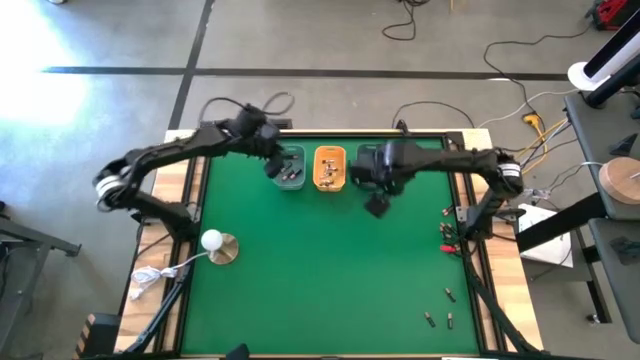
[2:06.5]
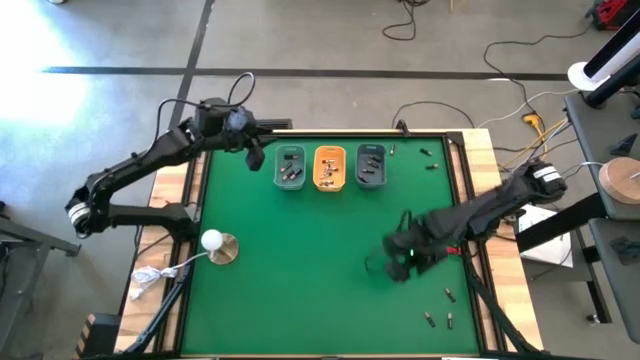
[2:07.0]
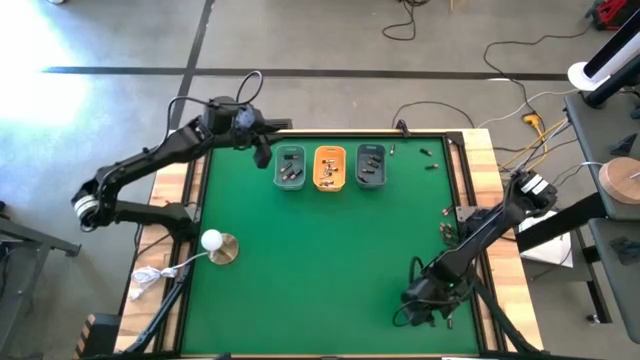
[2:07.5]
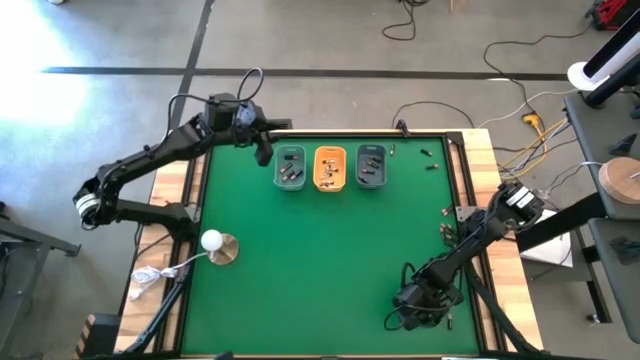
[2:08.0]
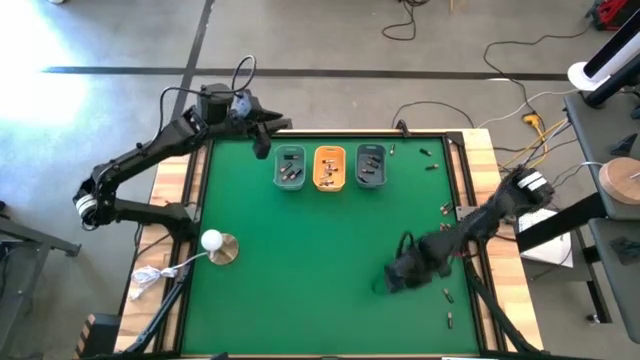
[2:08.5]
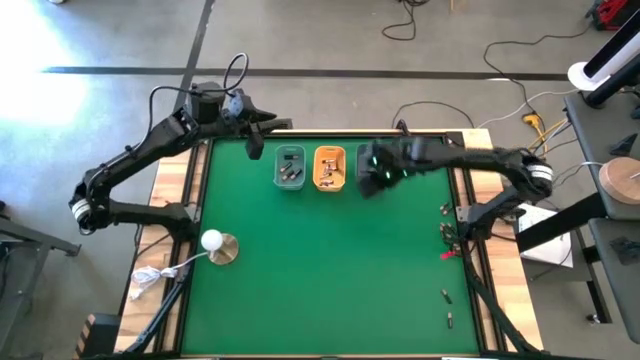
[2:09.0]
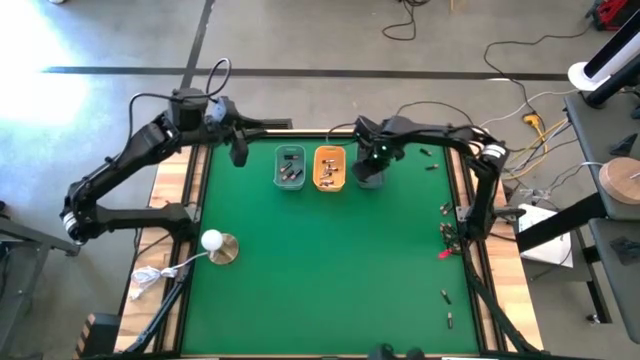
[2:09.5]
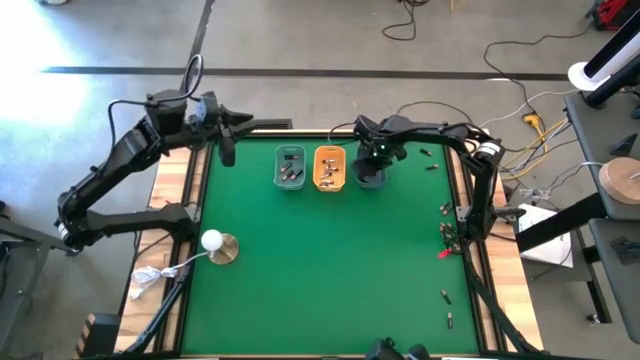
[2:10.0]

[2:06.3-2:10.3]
Task: Sort batteries
Put the small brown battery into the gray bin

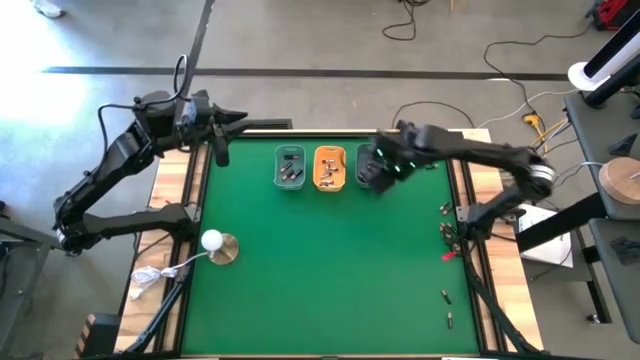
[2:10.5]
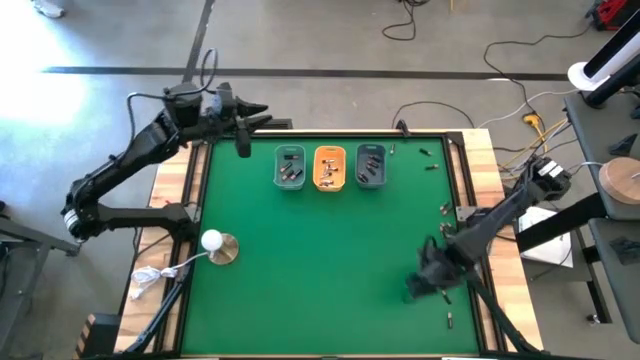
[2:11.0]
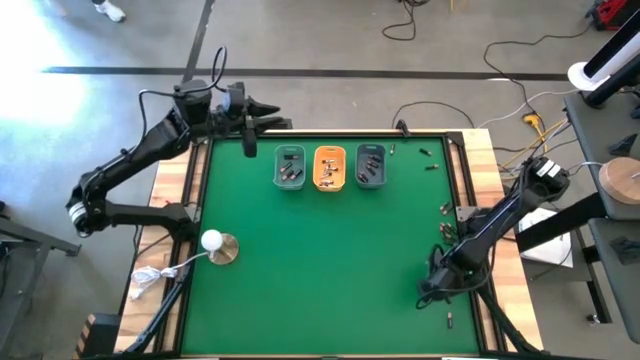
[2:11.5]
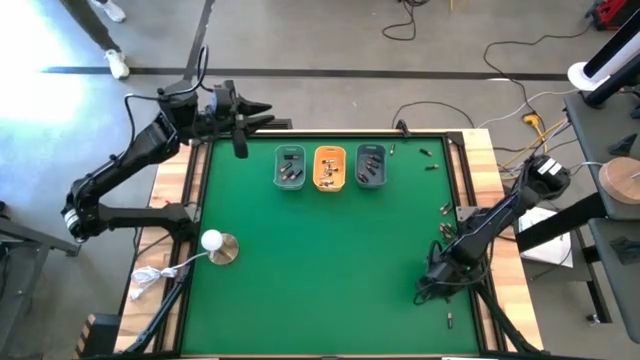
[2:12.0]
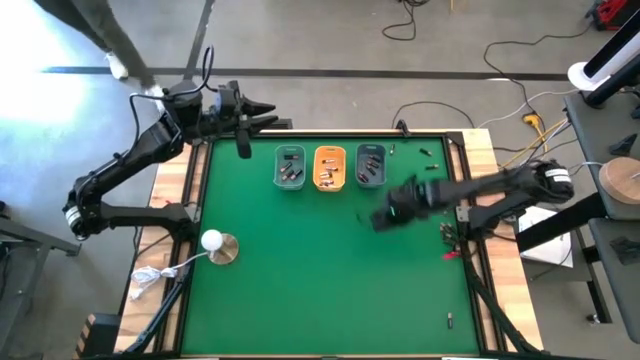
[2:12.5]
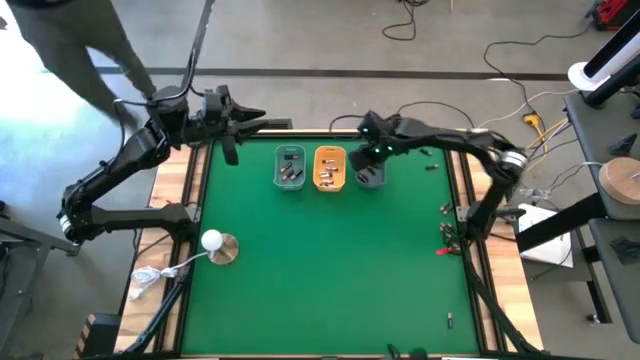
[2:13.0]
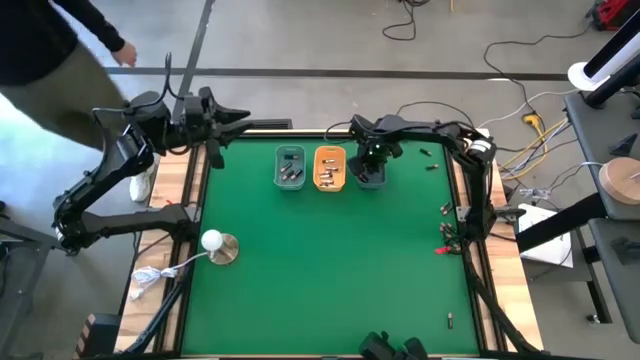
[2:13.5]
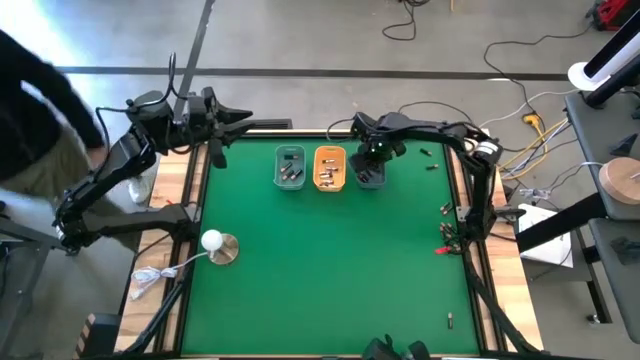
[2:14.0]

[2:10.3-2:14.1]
Put the small brown battery into the gray bin

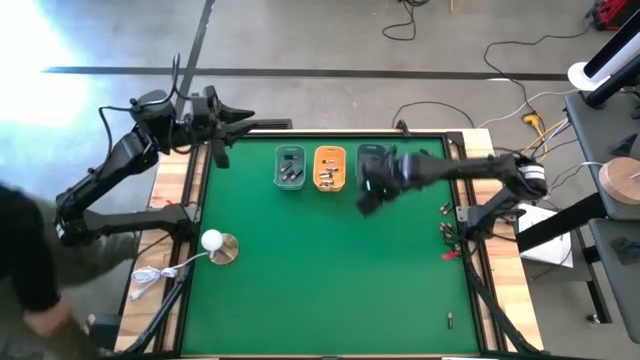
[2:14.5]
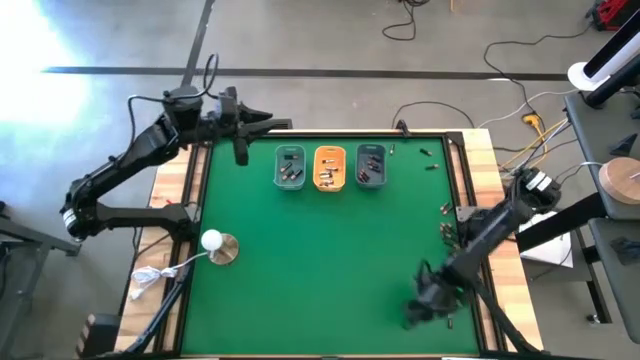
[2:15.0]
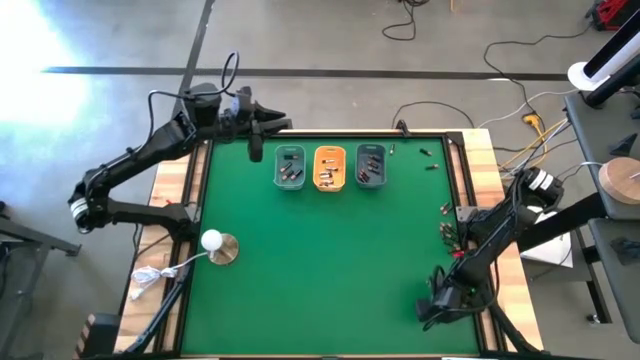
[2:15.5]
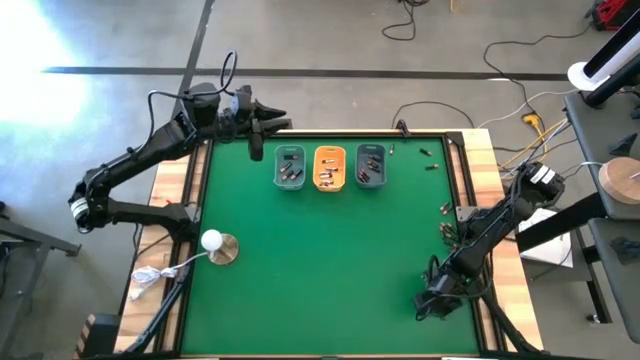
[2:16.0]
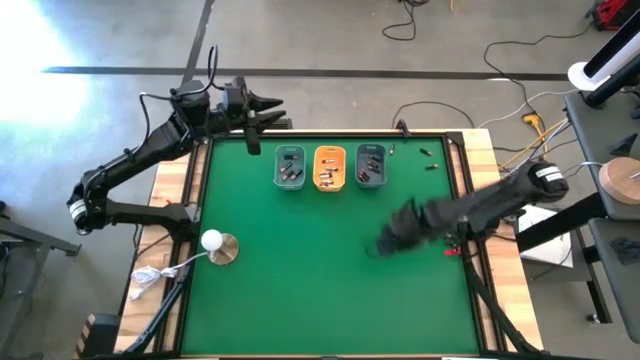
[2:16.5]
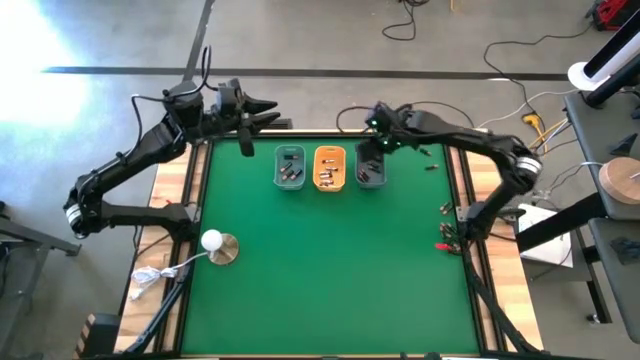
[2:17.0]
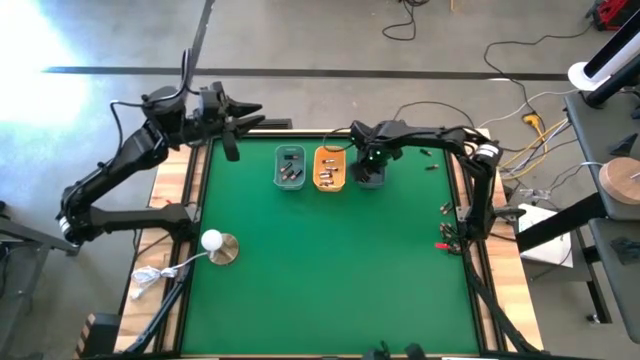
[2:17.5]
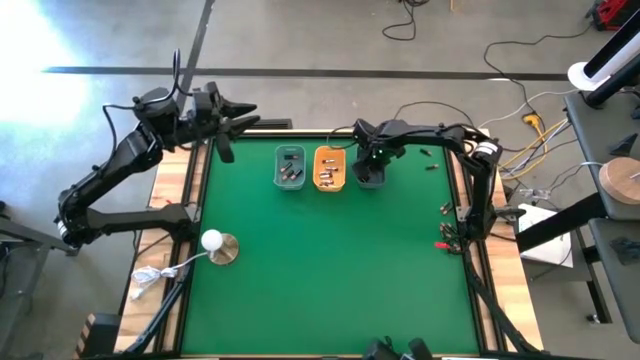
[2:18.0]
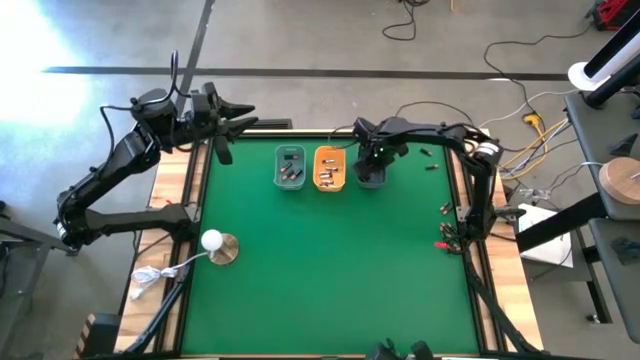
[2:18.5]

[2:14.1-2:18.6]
Put the small brown battery into the gray bin

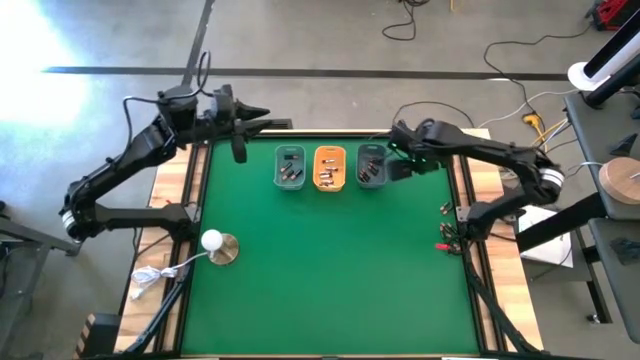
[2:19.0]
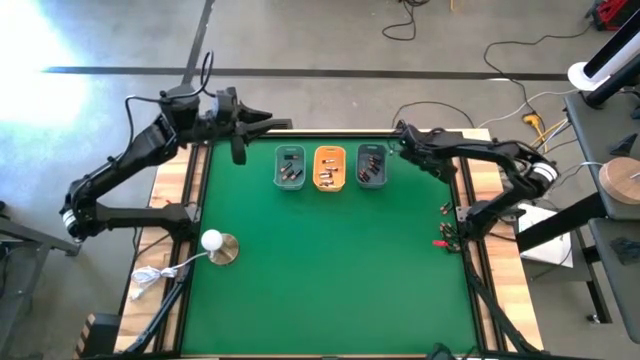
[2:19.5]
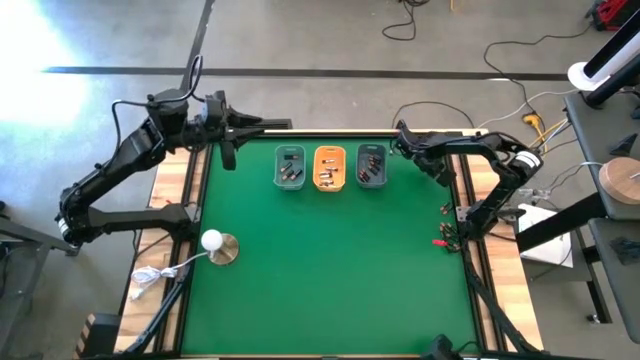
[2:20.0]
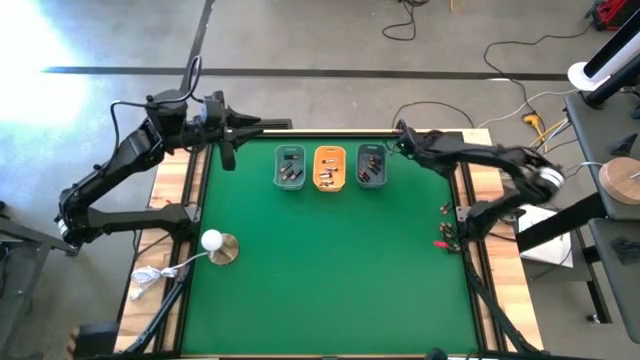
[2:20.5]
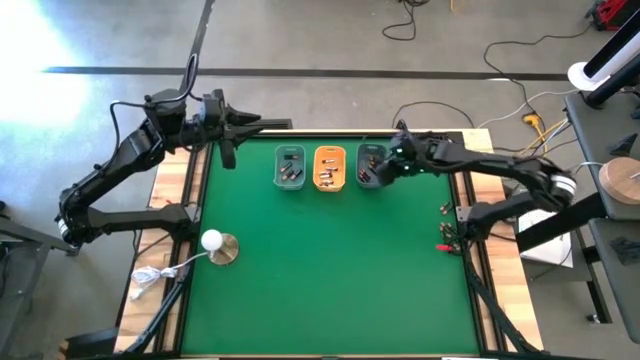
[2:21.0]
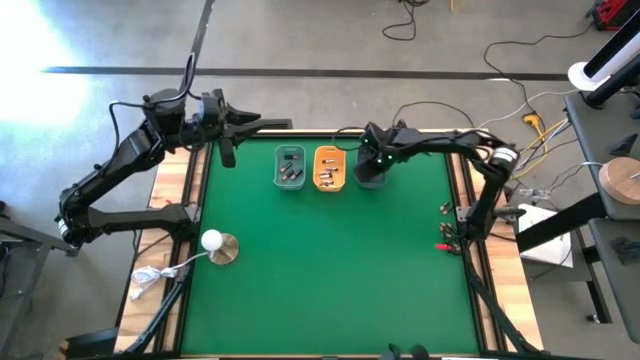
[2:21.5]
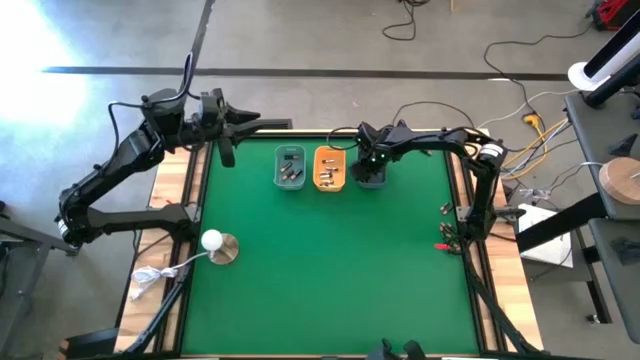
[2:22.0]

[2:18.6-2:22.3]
Put the small brown battery into the gray bin

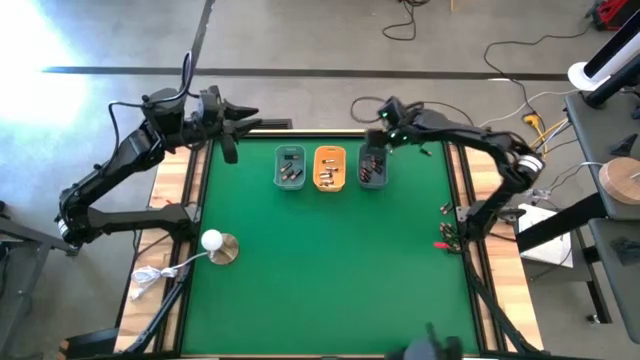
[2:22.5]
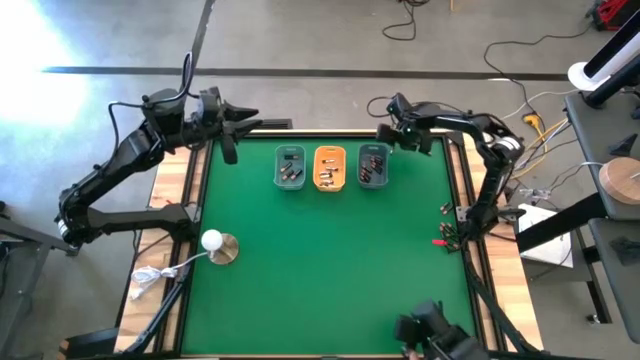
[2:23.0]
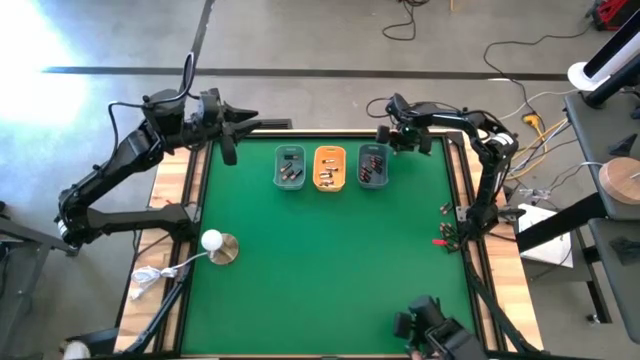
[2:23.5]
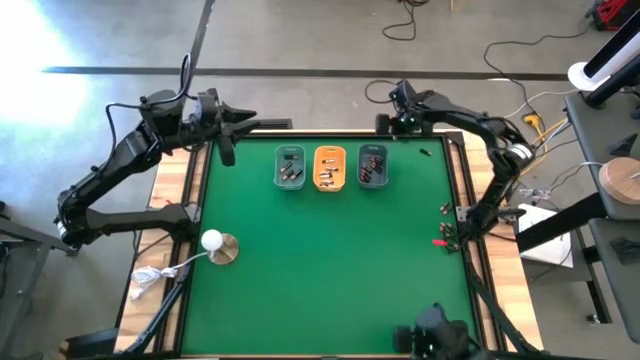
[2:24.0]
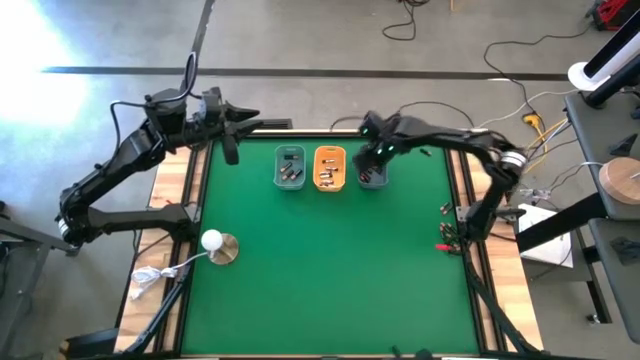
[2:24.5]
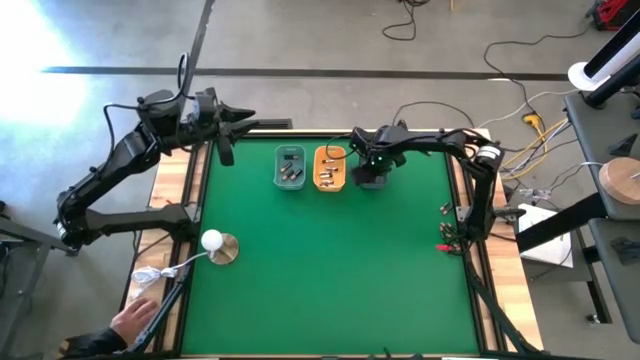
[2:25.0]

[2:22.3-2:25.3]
Put the small brown battery into the gray bin

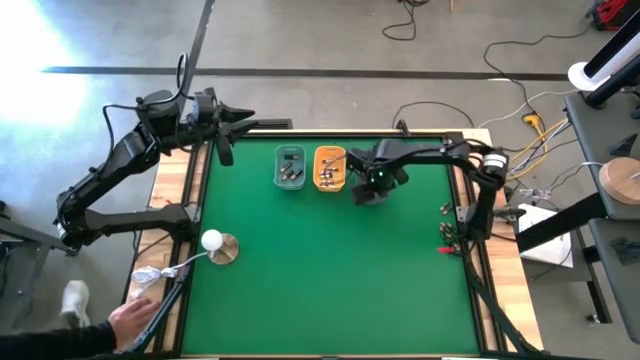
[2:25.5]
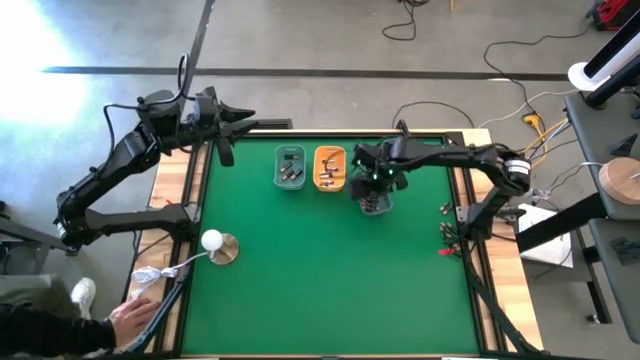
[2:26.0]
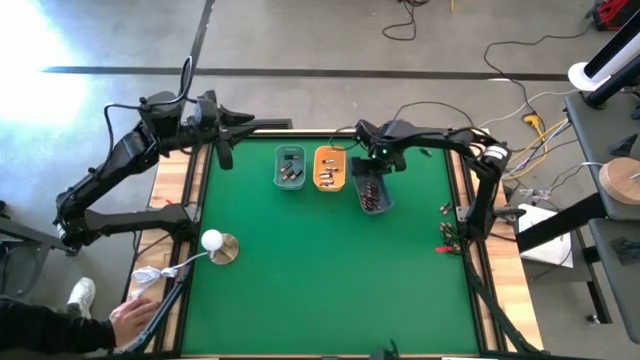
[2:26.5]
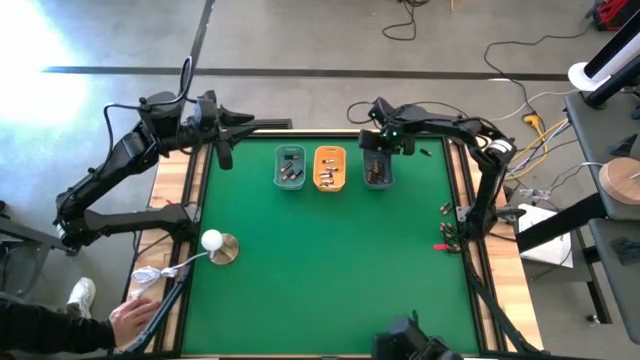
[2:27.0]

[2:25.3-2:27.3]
Adjust the gray bin
